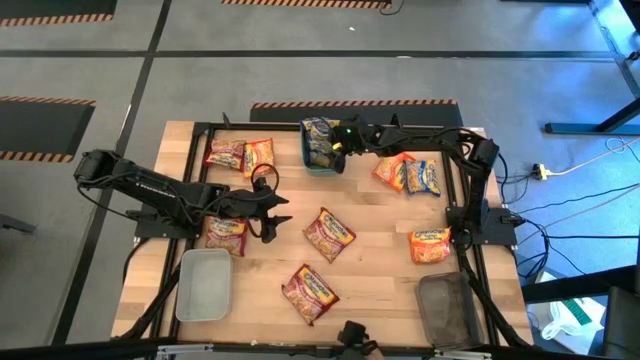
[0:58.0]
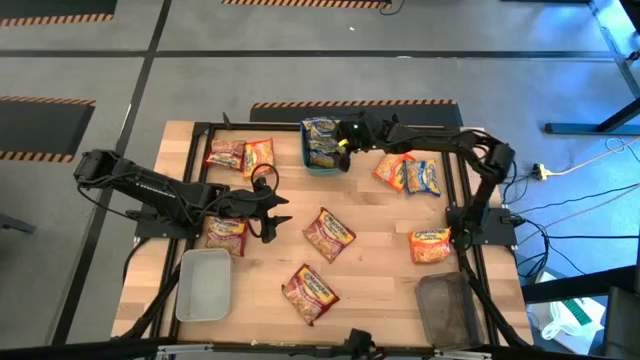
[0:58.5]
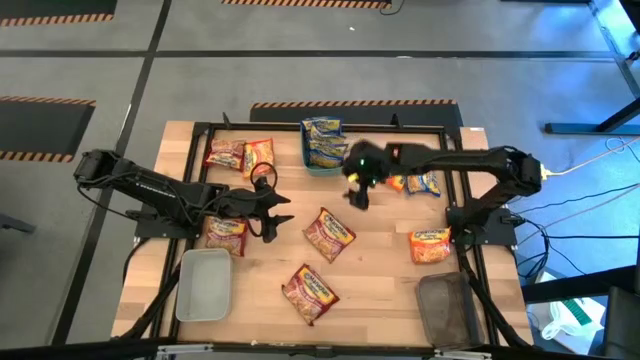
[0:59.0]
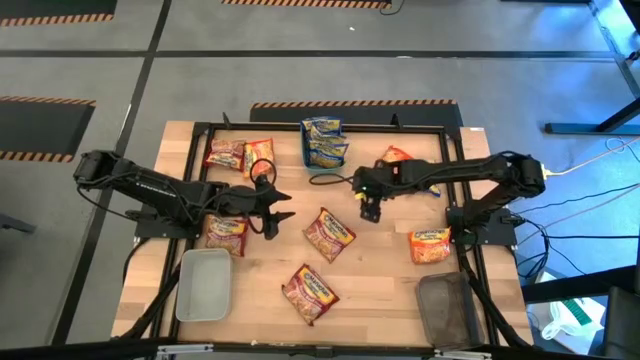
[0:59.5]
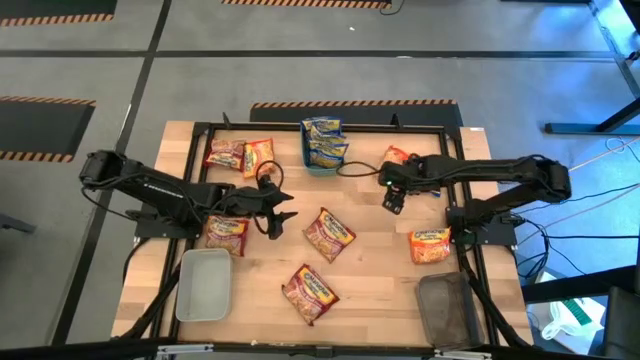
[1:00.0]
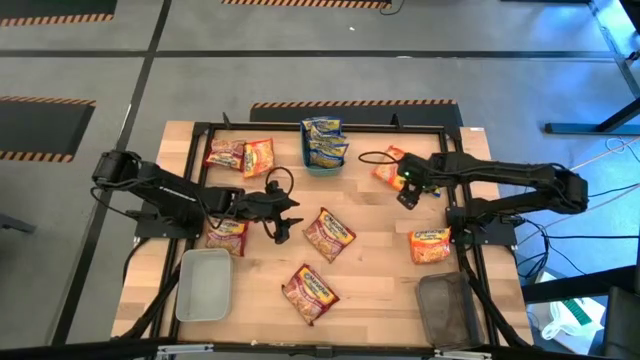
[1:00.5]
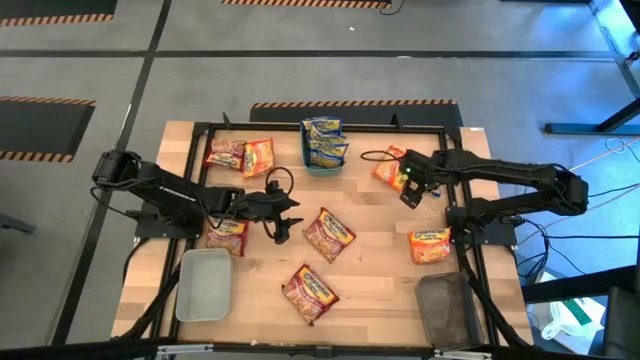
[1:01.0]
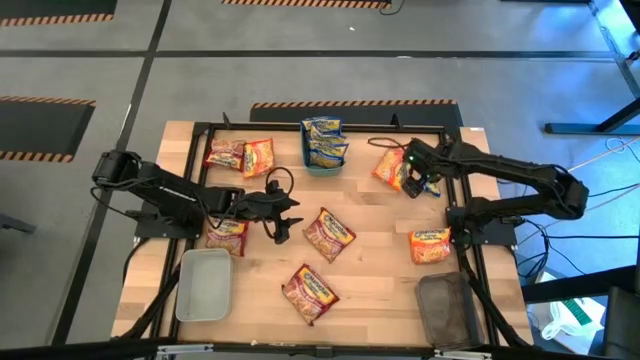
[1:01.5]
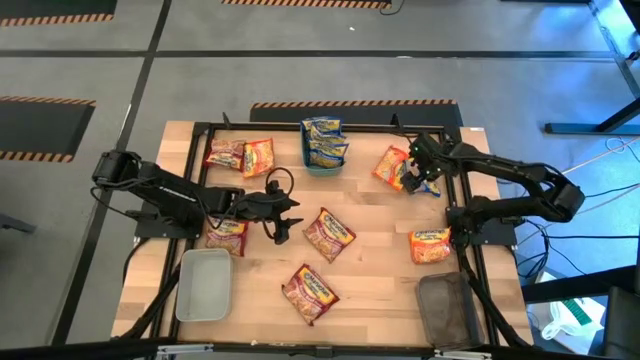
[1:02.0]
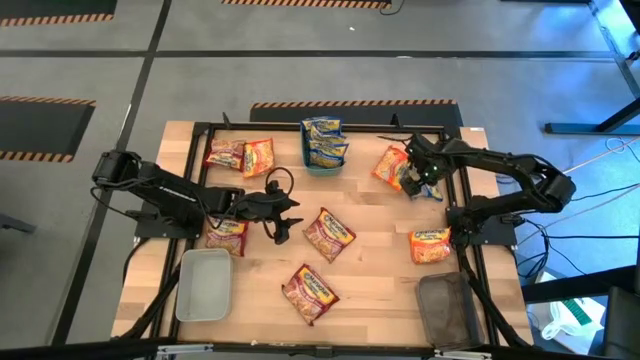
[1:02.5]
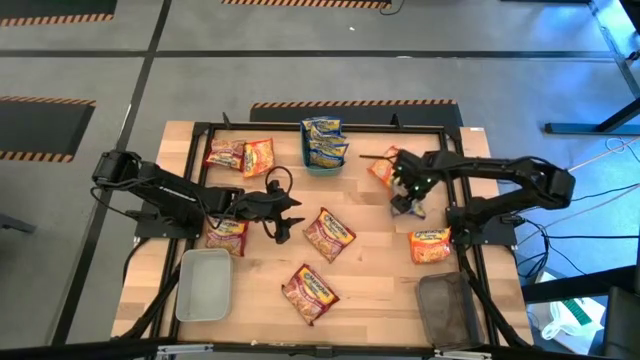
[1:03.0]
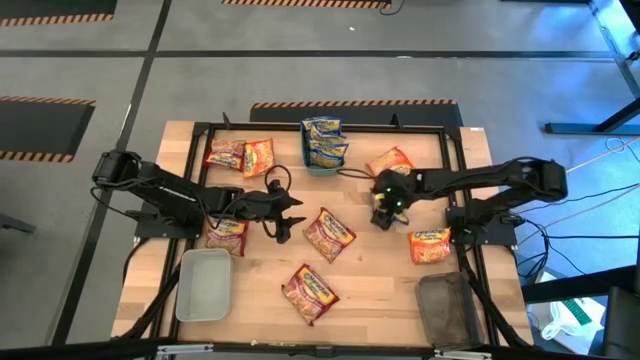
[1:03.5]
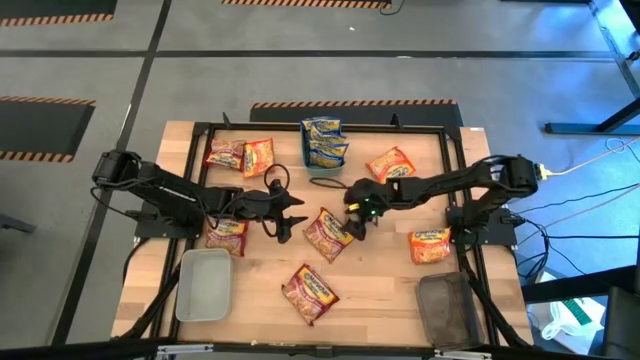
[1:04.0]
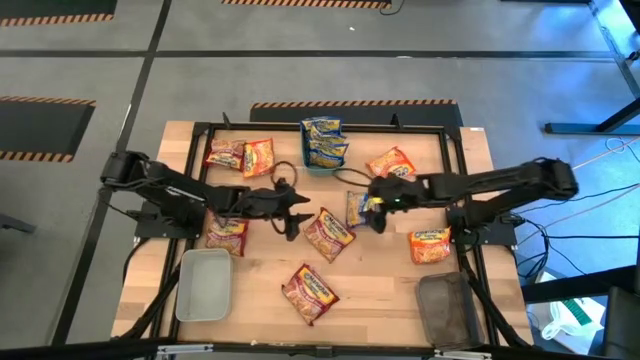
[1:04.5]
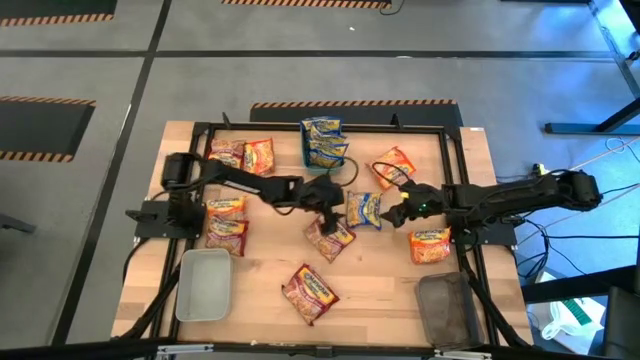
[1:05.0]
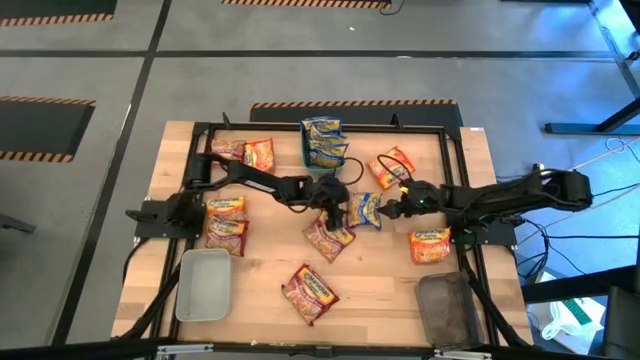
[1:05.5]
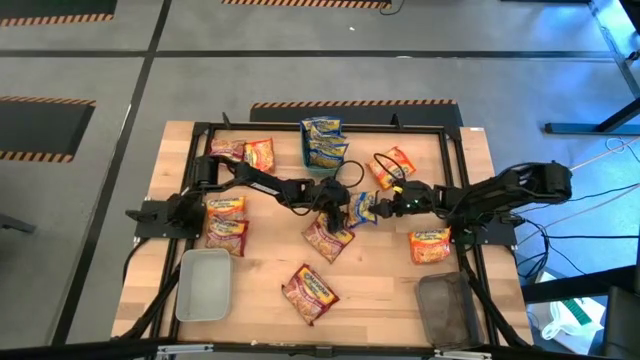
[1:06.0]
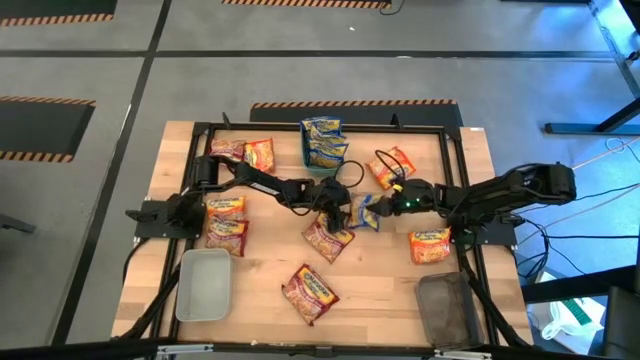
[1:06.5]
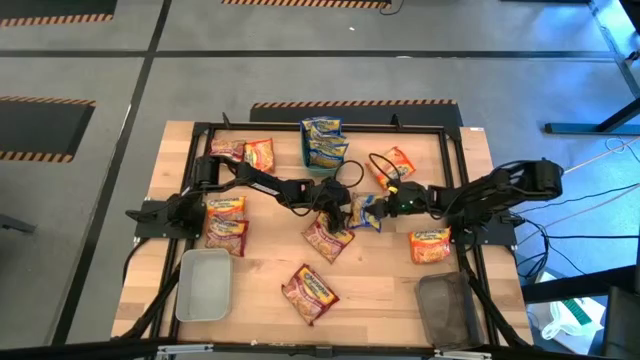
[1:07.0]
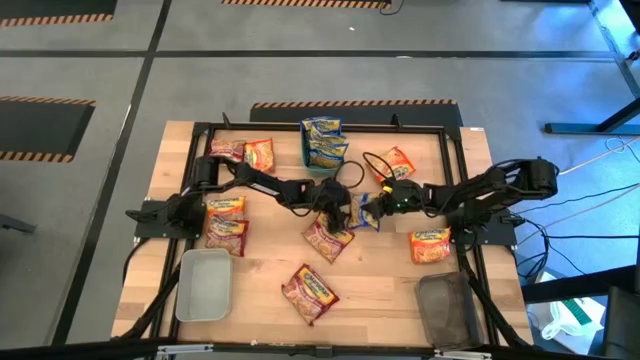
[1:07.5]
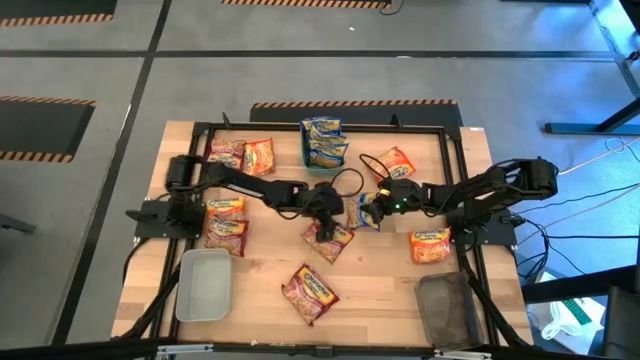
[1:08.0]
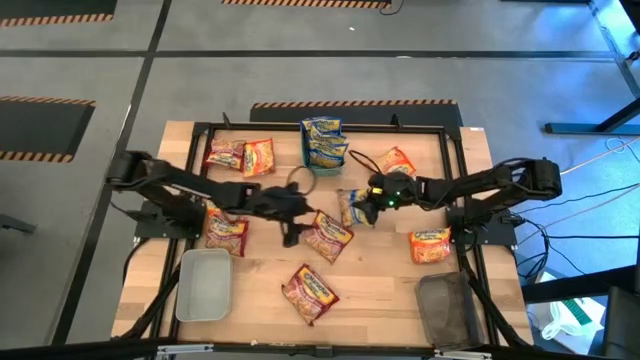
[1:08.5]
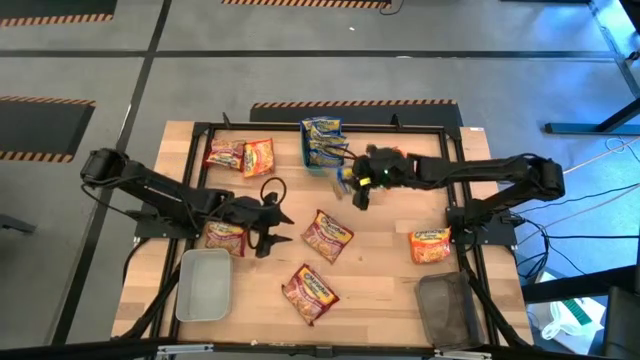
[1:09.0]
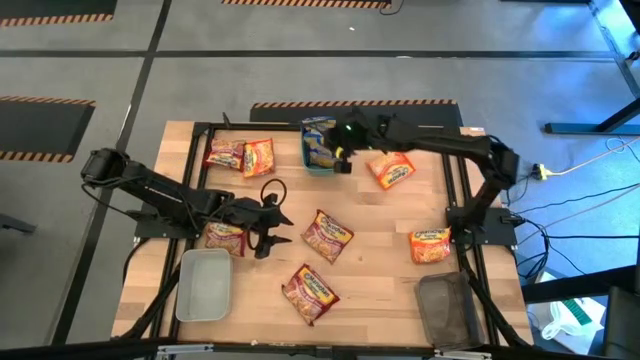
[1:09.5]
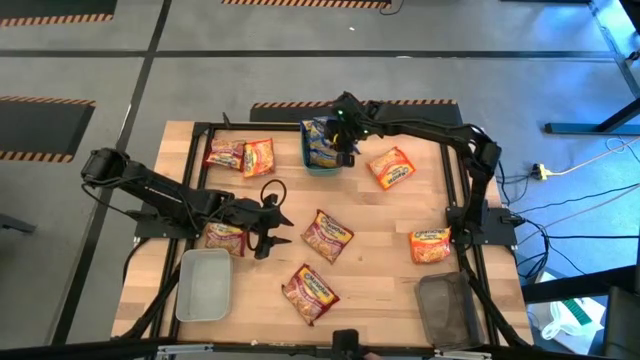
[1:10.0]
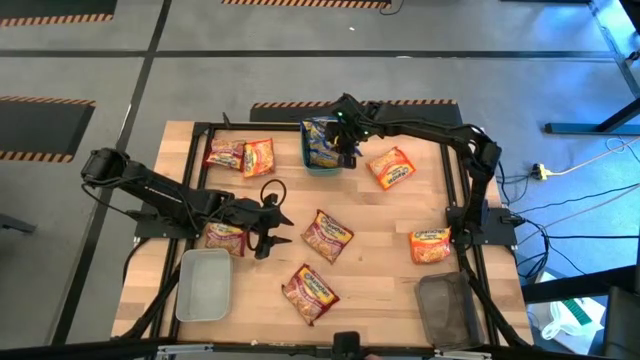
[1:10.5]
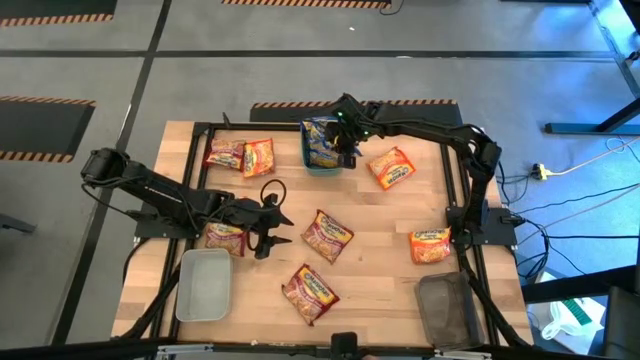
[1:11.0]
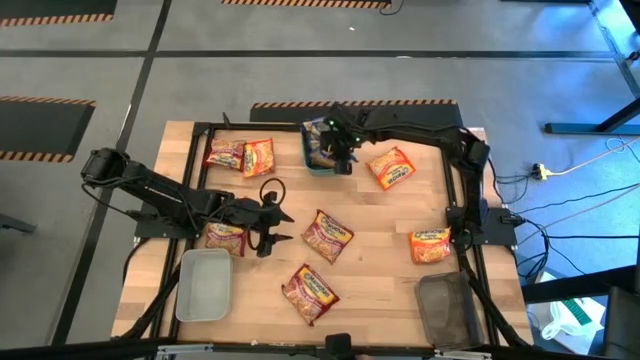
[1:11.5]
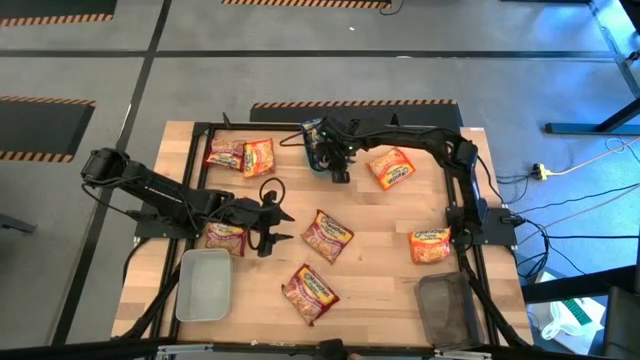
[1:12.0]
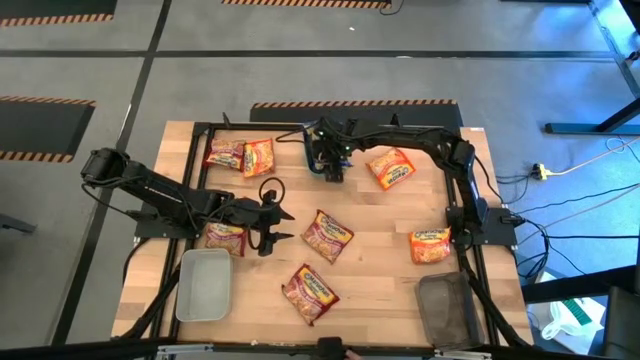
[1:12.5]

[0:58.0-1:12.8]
Task: Sort Maruchan noodles
Put the blue noodle pack into the green bin

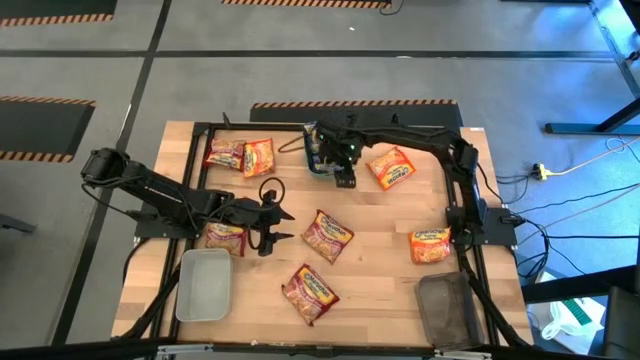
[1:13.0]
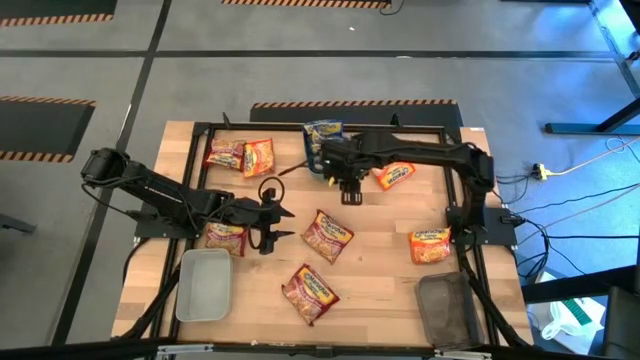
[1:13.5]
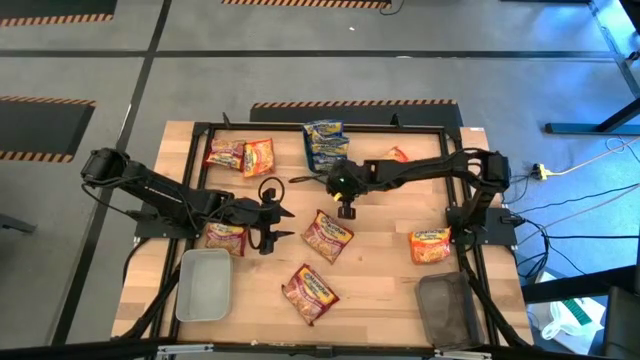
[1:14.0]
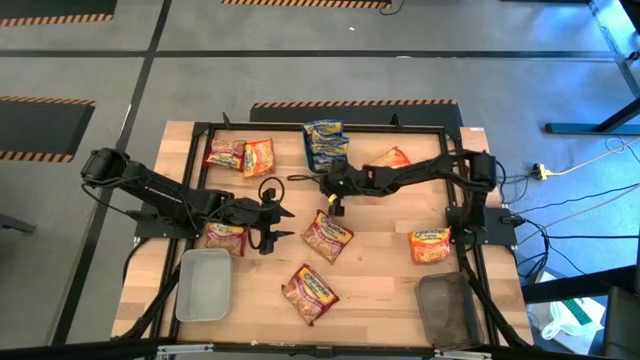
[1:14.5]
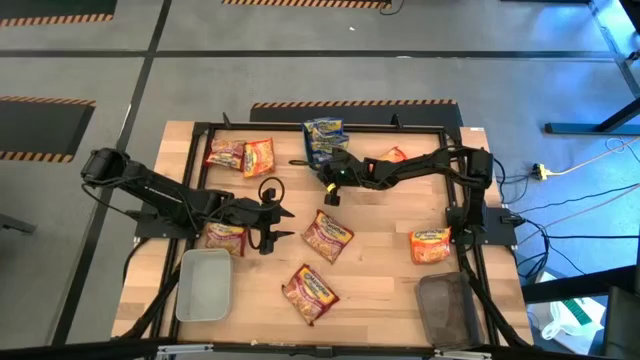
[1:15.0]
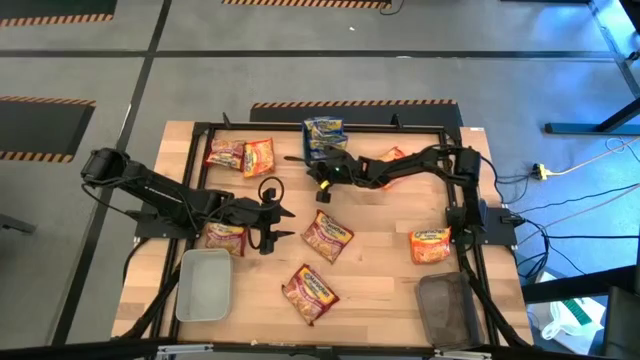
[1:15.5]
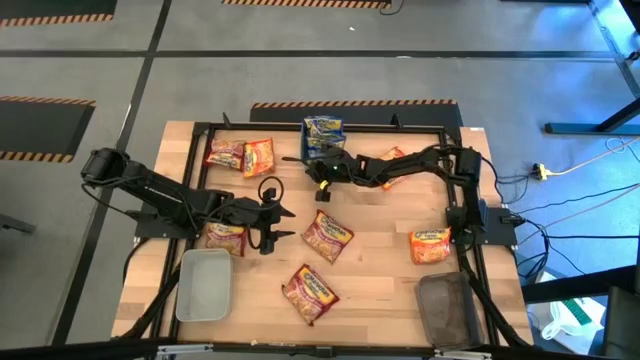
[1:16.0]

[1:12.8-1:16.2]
Adjust the green bin on the table
